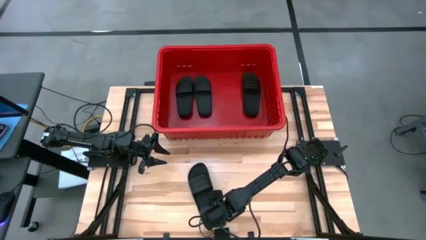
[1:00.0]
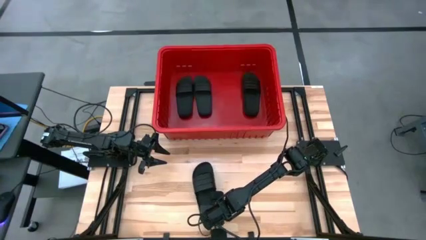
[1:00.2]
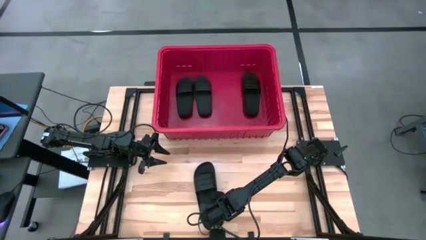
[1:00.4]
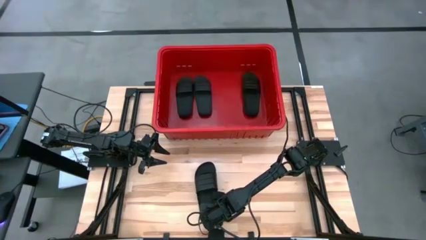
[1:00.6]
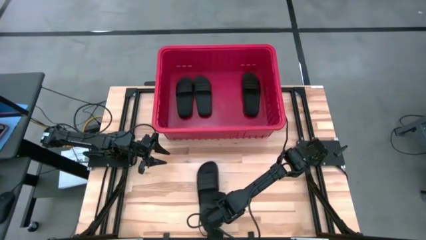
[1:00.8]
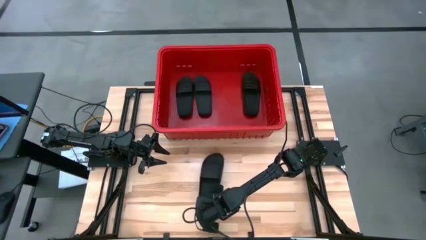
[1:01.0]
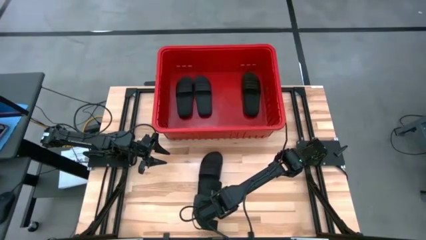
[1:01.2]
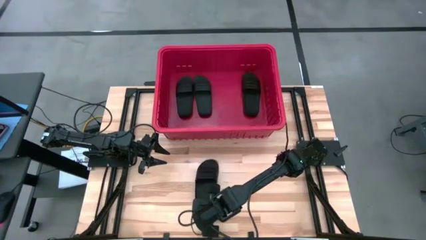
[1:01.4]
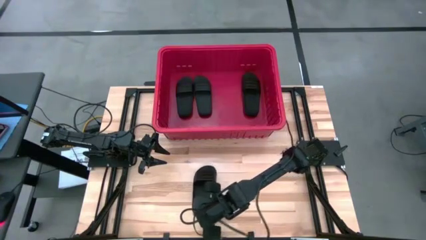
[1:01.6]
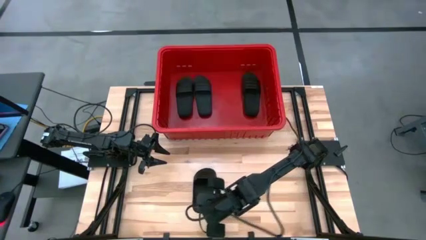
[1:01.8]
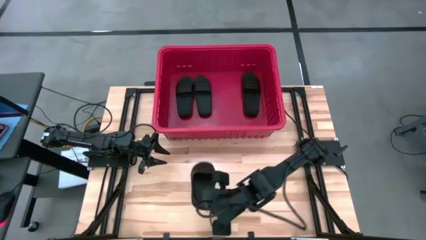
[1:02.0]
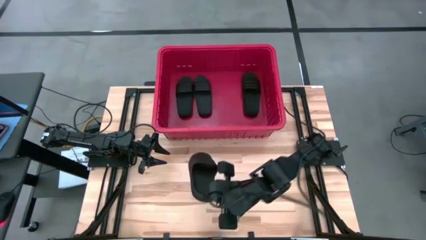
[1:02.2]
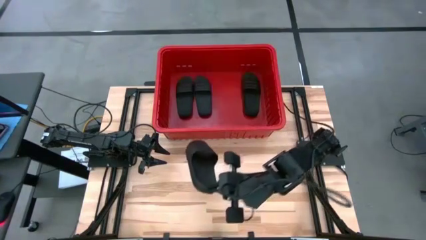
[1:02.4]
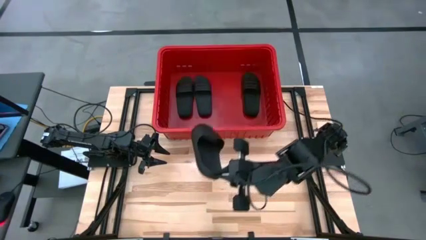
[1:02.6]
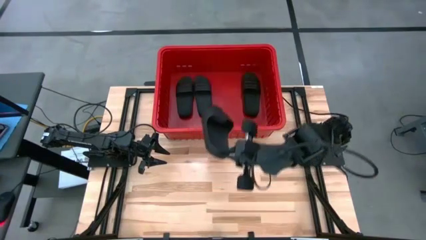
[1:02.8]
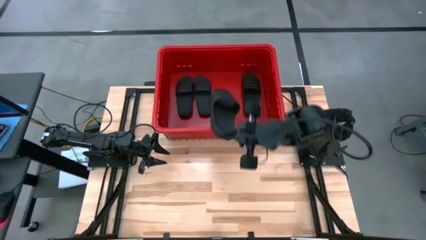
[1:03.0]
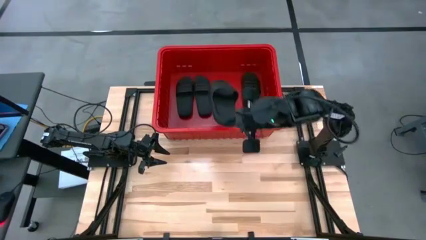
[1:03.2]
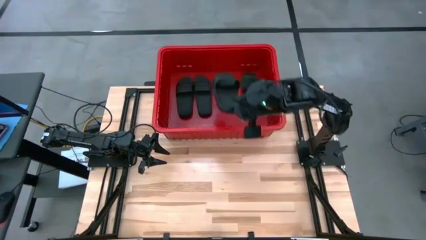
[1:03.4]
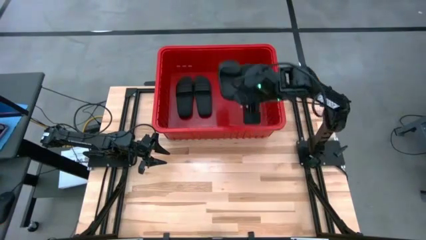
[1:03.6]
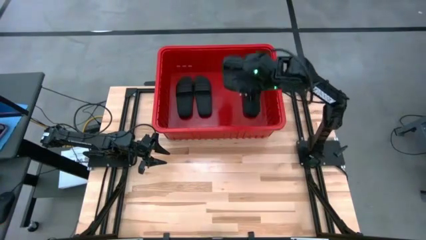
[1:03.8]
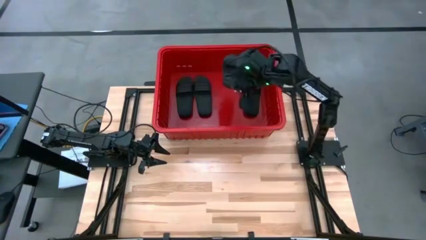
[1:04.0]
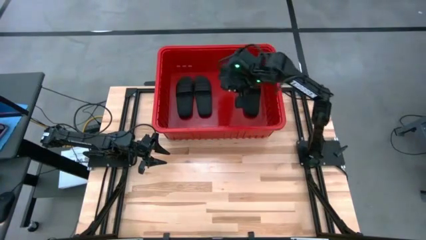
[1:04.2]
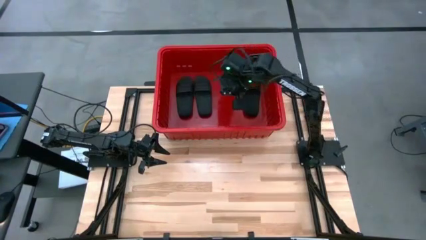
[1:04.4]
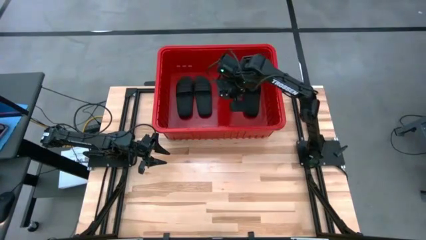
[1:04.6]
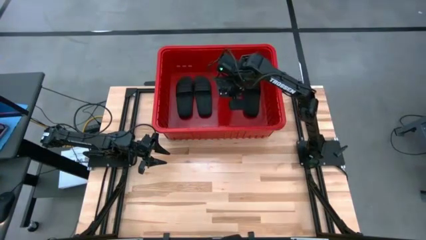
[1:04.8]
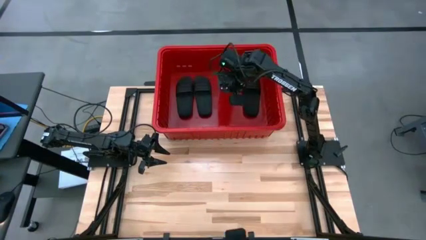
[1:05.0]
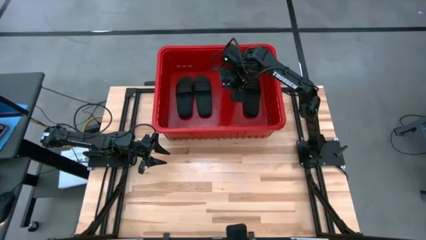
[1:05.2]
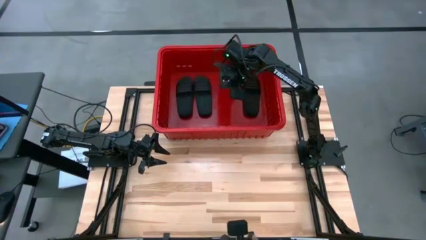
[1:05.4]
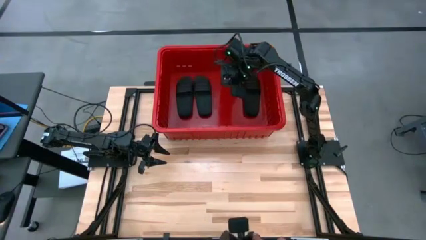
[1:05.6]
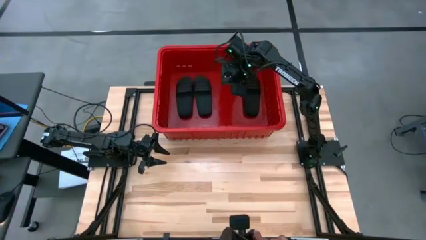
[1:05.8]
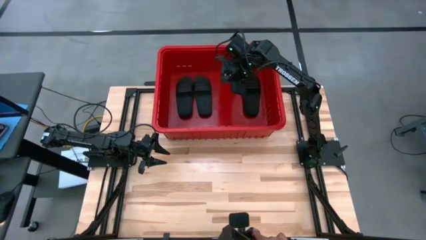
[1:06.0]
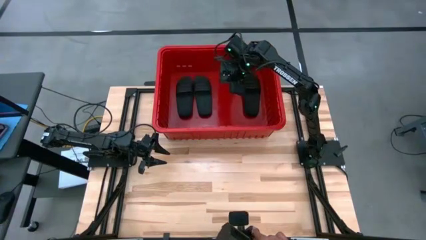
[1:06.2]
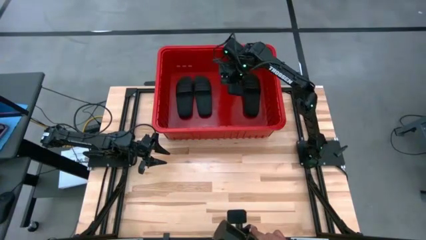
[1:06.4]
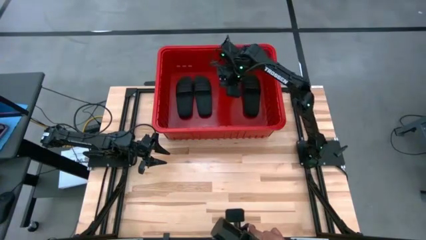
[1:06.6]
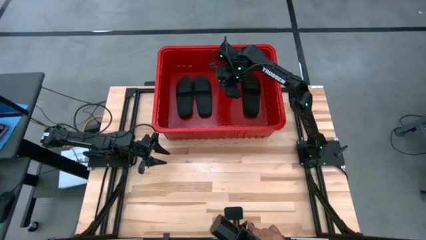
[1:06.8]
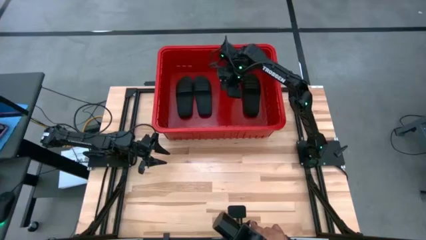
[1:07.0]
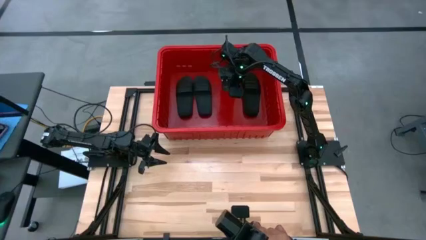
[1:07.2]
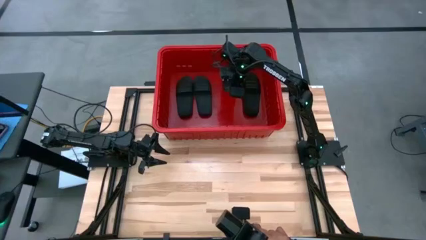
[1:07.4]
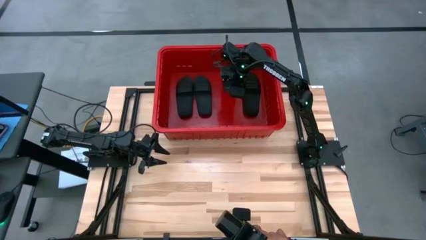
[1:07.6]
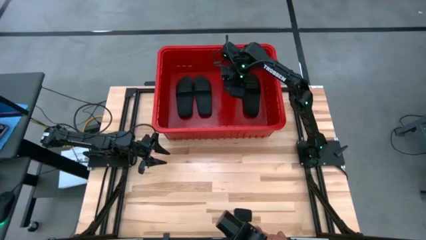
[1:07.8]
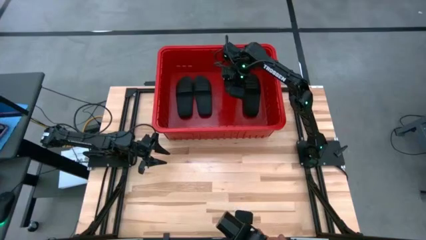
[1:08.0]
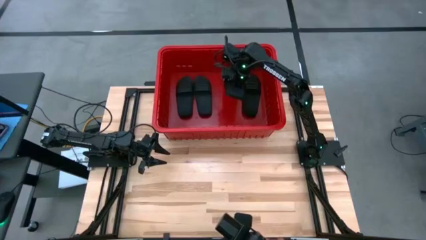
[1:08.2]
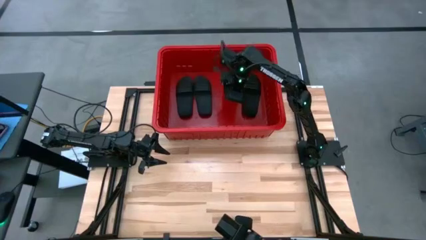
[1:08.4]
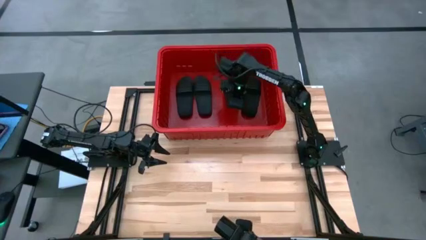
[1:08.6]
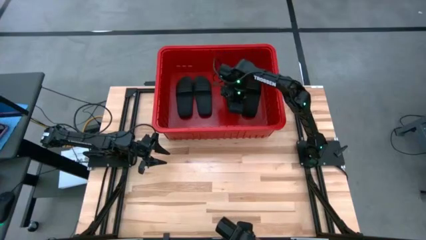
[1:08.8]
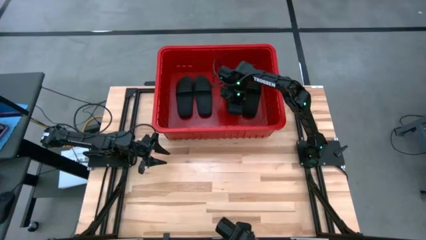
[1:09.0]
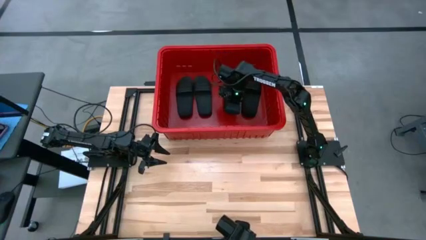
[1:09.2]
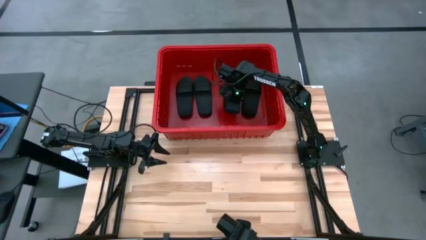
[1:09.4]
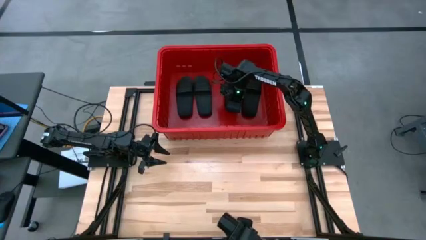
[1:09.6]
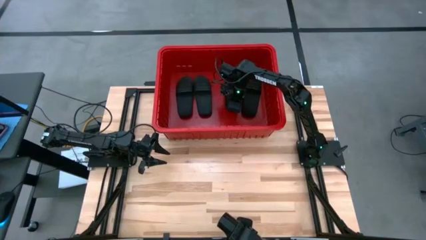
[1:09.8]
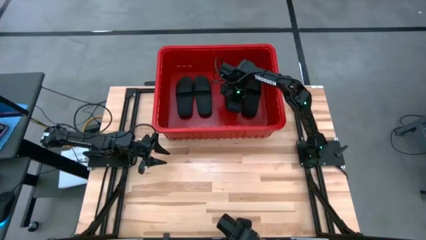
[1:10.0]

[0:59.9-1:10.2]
Task: Pick and place slides into bin
Put the black slide into the red bin

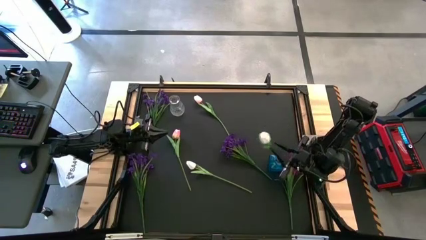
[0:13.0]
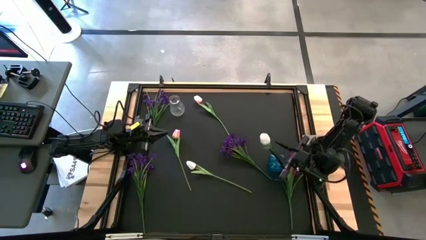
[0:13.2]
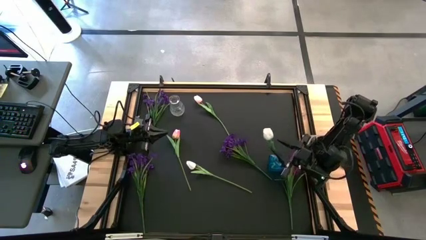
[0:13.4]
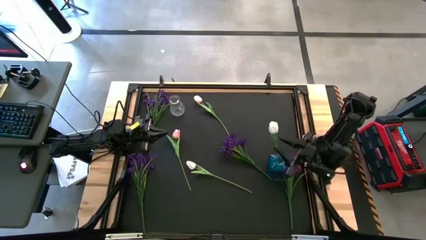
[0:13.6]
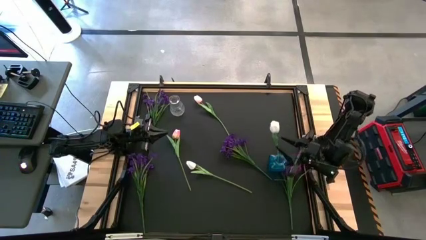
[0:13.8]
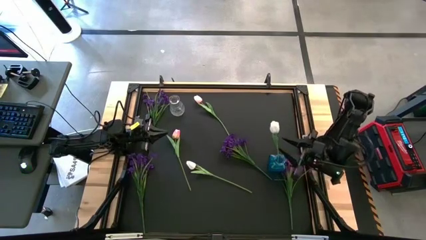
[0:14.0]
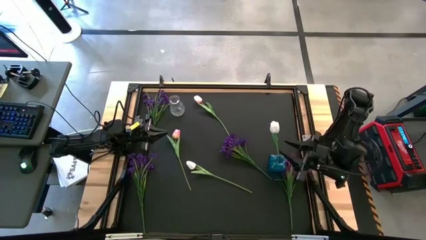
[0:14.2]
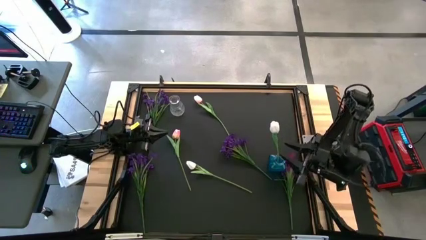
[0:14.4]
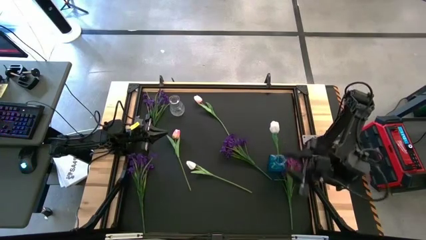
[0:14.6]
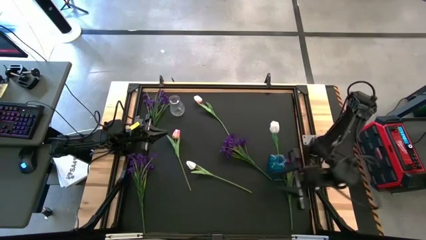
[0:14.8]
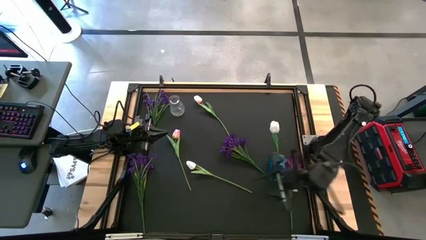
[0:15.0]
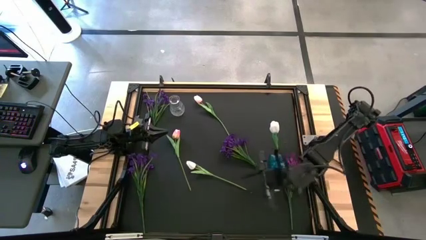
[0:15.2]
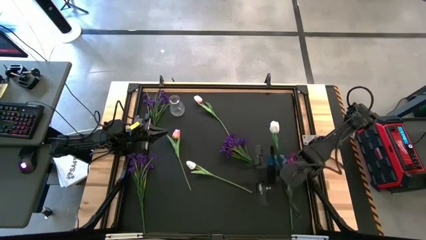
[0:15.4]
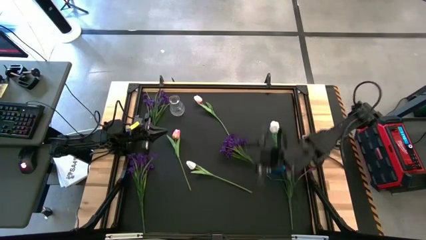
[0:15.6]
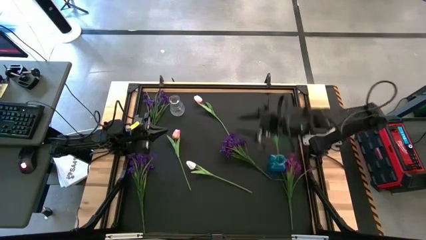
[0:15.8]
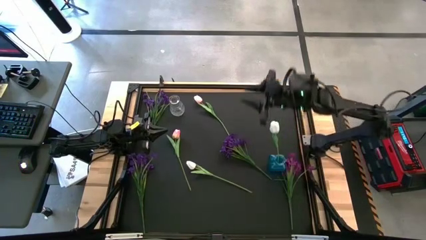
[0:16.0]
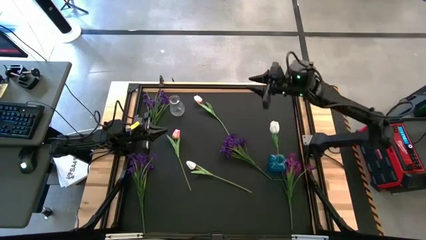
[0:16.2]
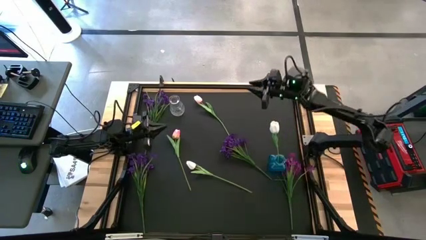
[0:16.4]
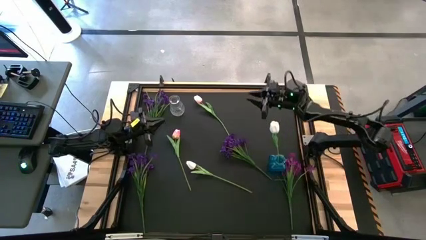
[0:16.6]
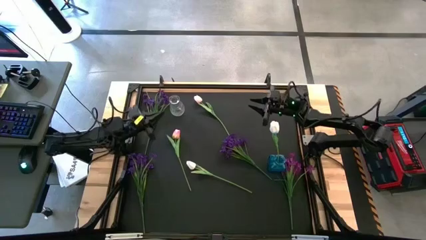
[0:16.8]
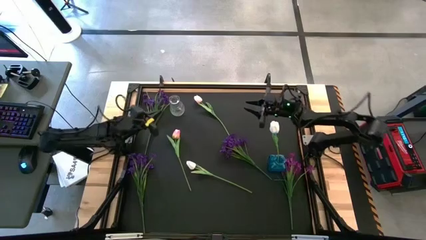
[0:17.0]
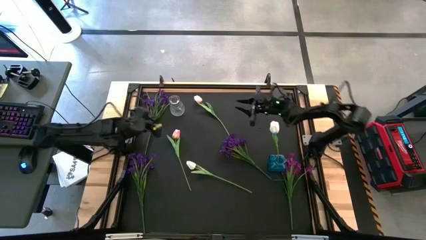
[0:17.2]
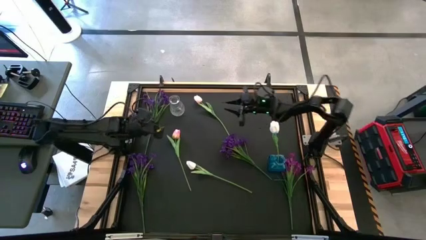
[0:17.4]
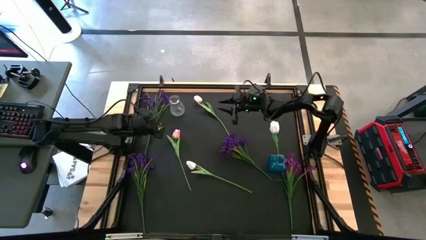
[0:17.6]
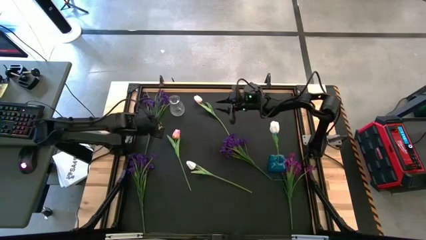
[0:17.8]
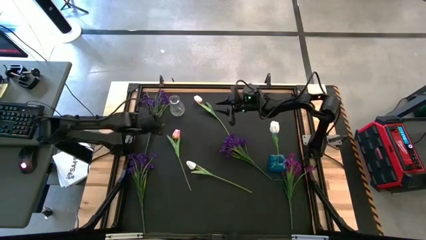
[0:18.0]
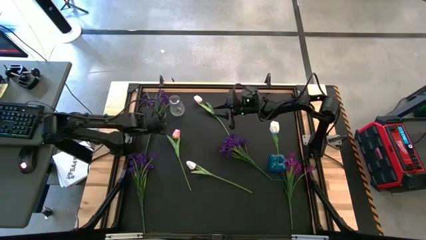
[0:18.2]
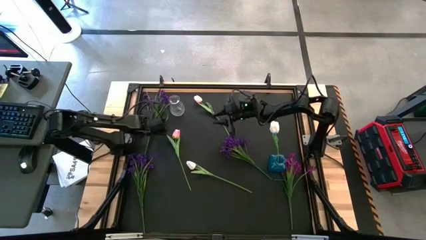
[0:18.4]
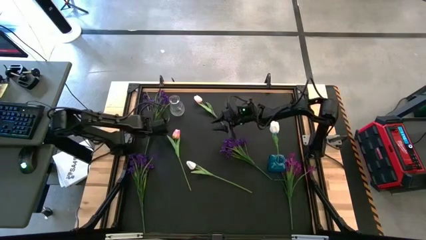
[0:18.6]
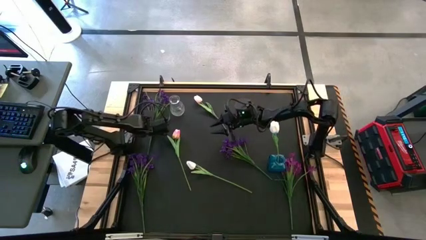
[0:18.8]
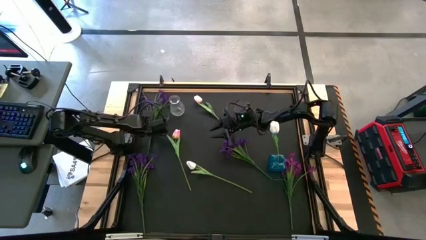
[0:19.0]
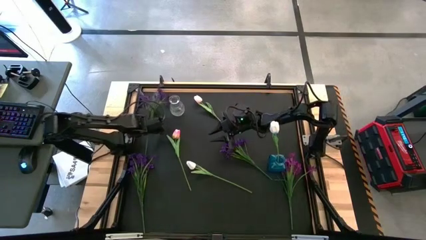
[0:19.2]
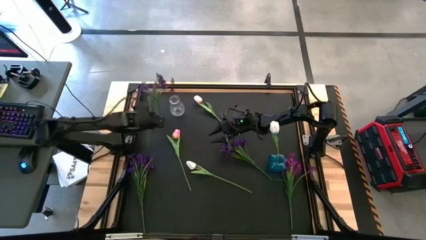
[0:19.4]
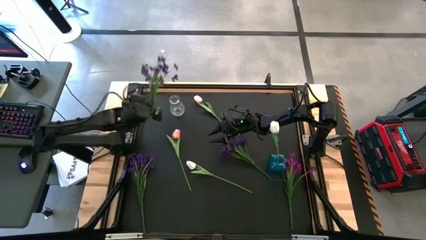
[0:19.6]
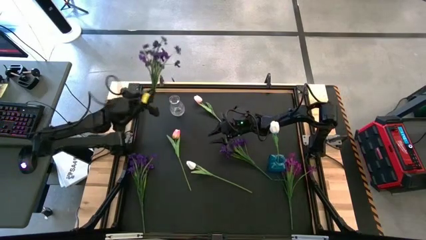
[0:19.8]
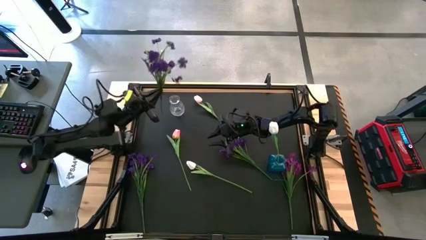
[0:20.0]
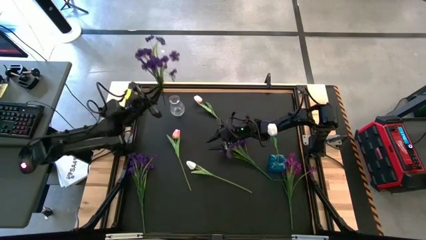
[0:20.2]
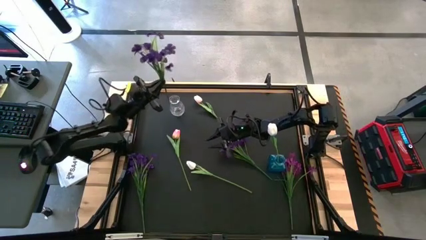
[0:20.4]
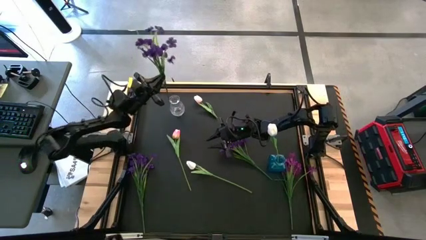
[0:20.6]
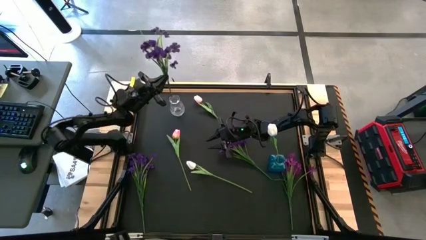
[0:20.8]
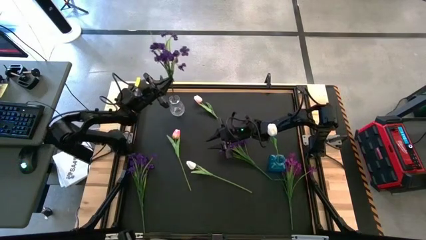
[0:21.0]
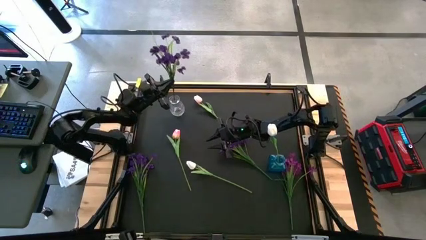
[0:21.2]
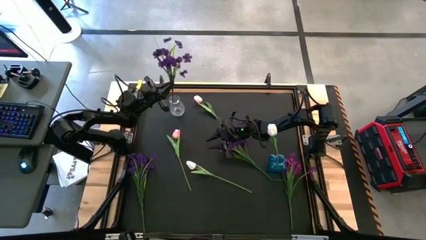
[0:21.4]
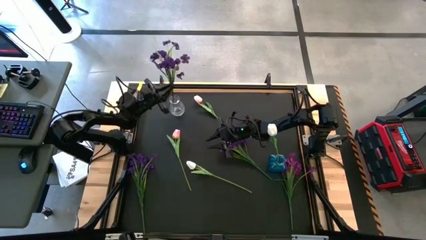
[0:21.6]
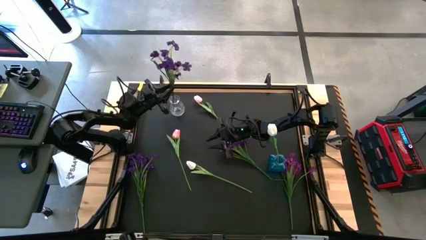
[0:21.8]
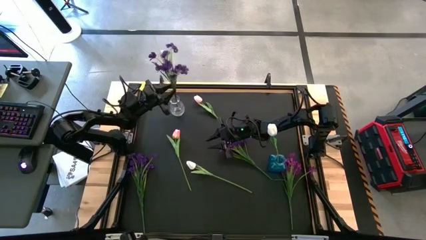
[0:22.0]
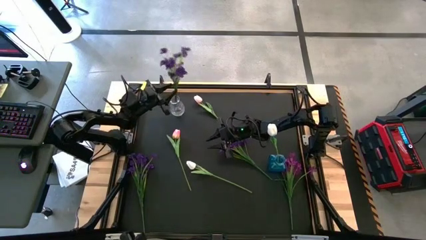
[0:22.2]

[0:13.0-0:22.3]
Task: Sort flowers into vase by color
Put the top left violet flowers into the transparent white vase
